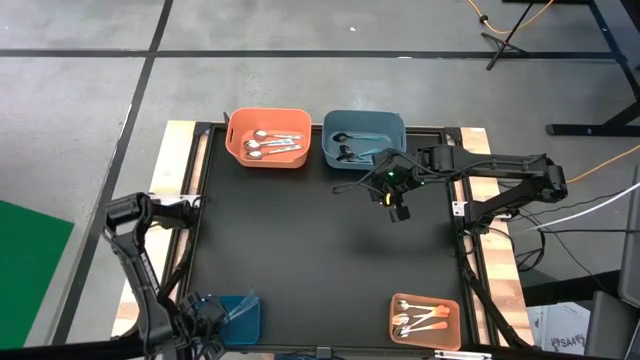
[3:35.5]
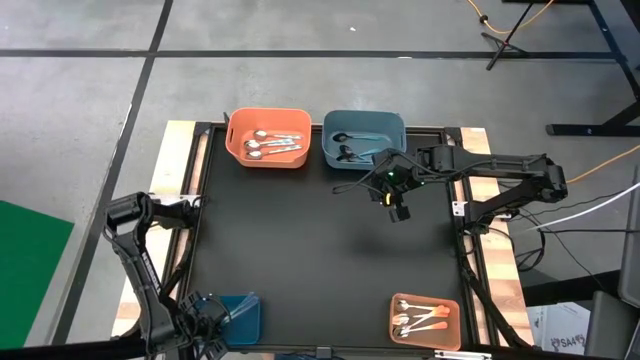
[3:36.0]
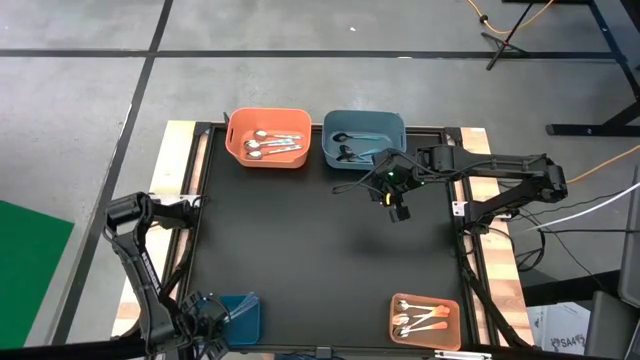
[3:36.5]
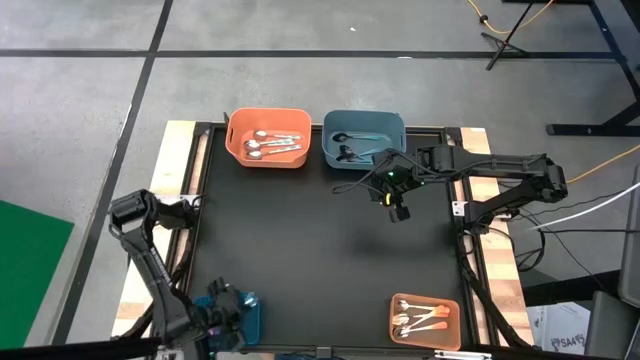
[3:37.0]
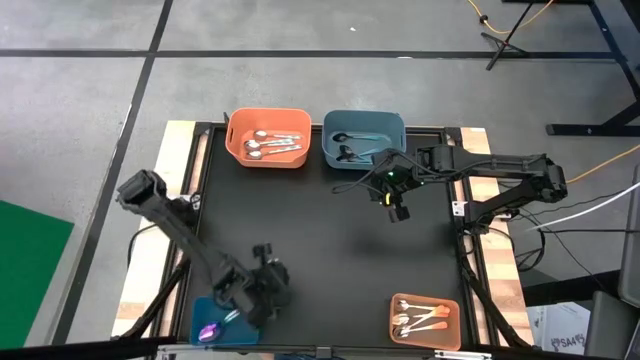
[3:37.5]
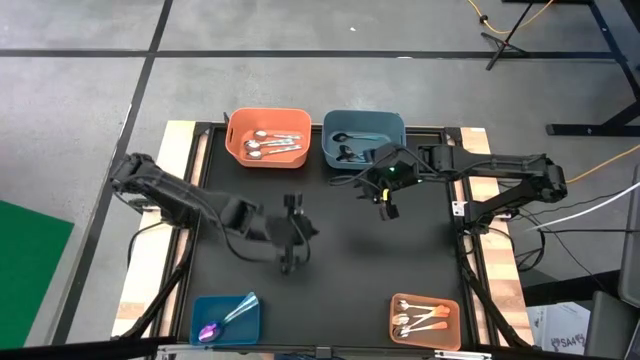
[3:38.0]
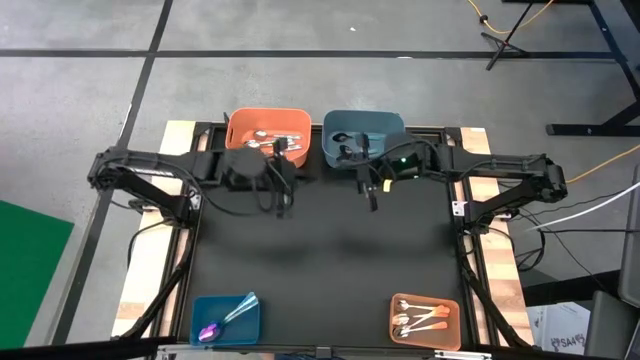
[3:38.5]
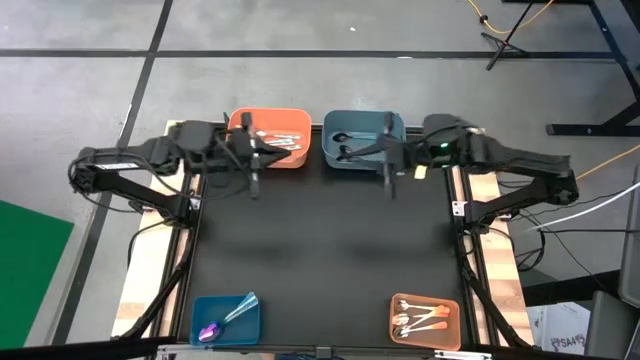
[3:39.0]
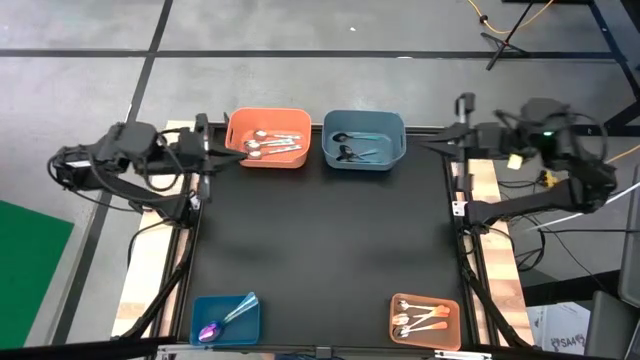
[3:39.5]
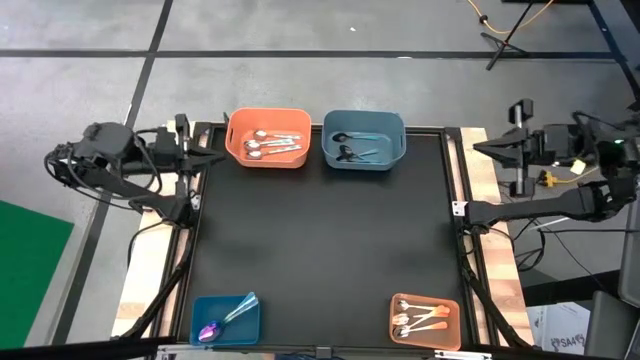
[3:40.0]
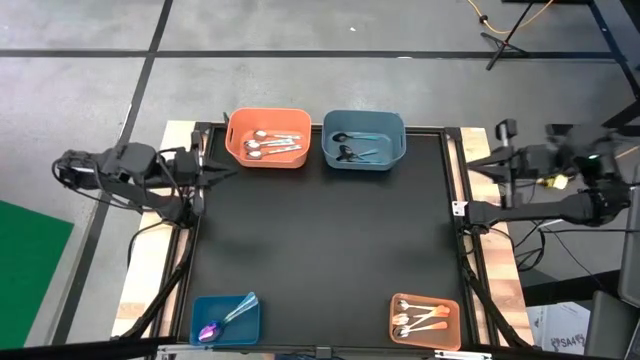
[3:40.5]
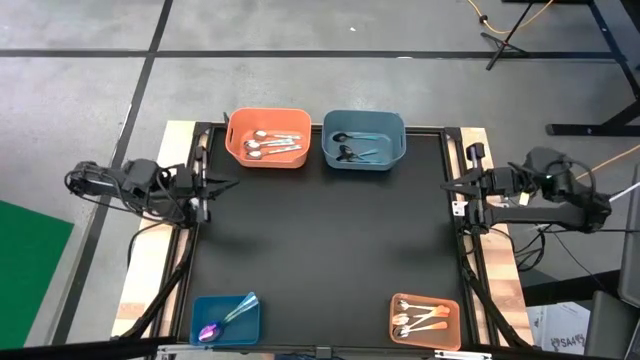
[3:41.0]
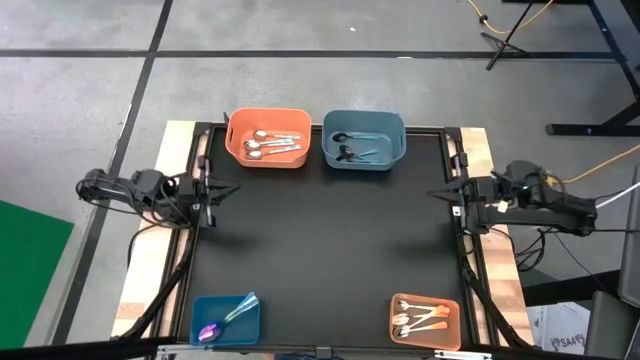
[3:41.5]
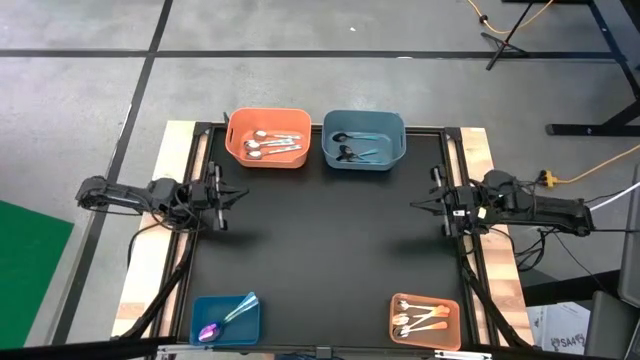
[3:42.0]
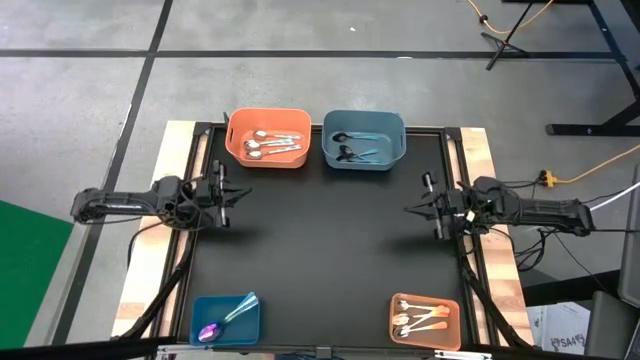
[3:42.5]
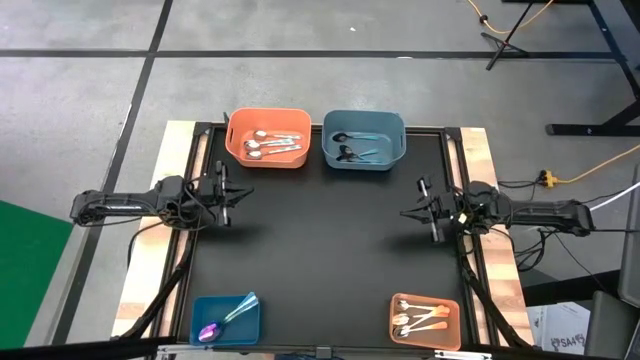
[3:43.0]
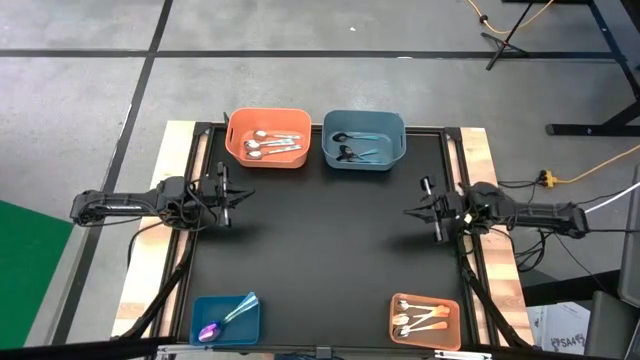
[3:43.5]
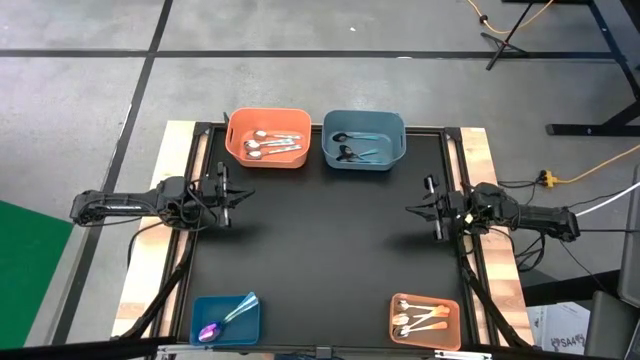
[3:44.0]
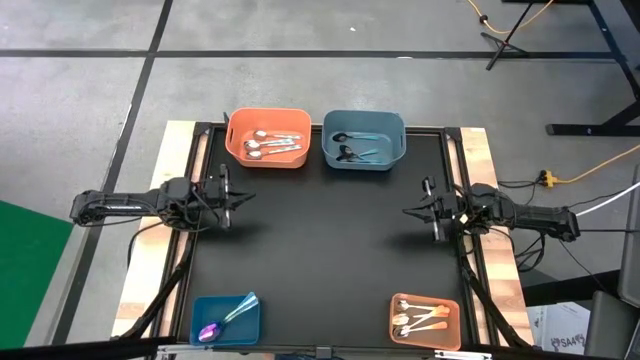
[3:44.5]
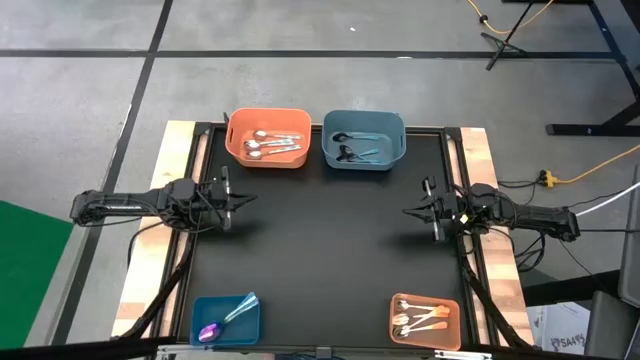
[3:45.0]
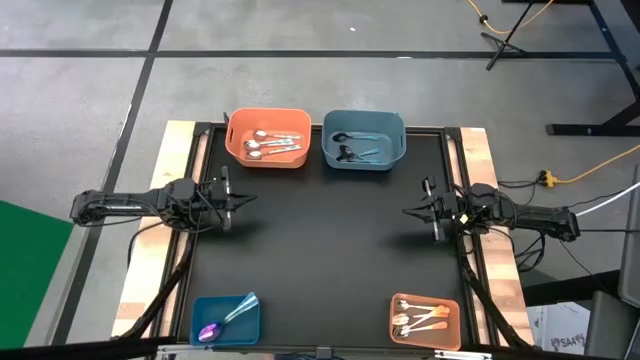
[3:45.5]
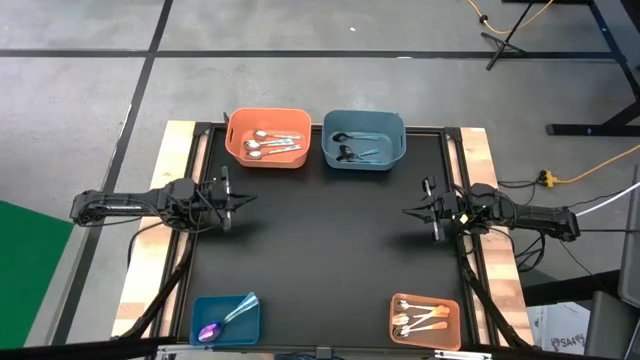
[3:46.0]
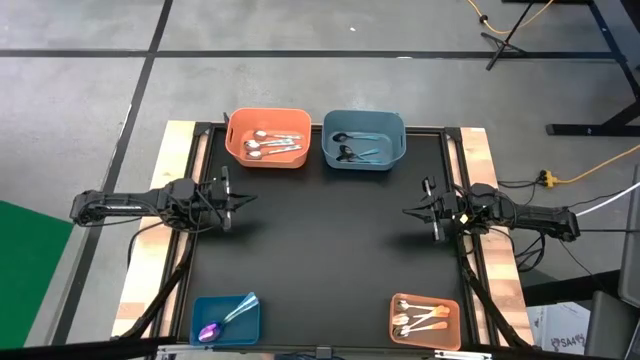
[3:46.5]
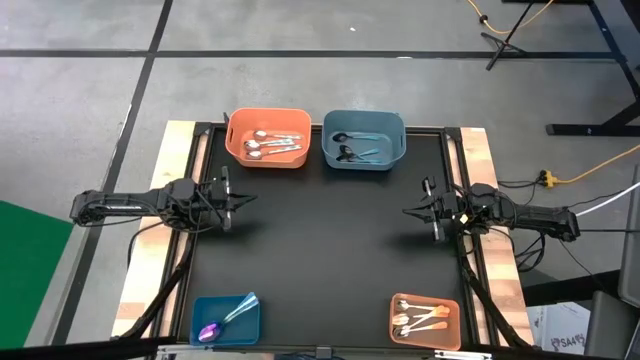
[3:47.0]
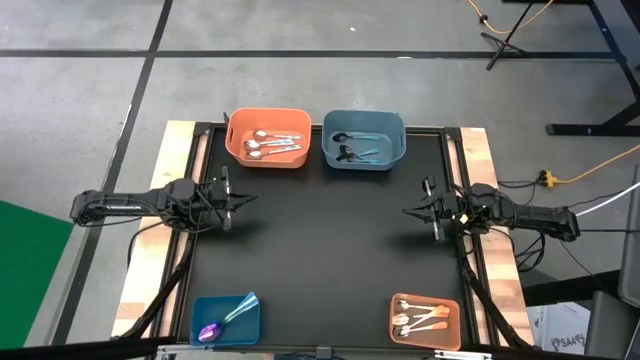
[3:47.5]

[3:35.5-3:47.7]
Task: Sort silverware by color (type)
Return to Home Position

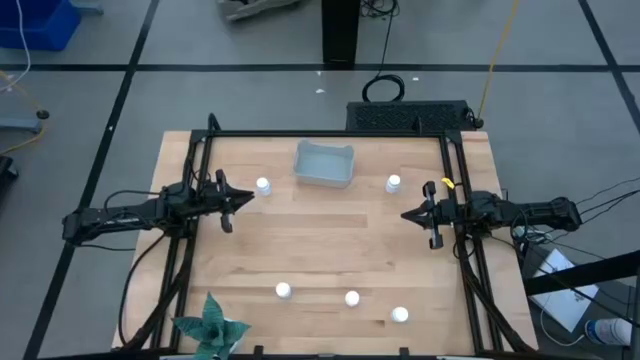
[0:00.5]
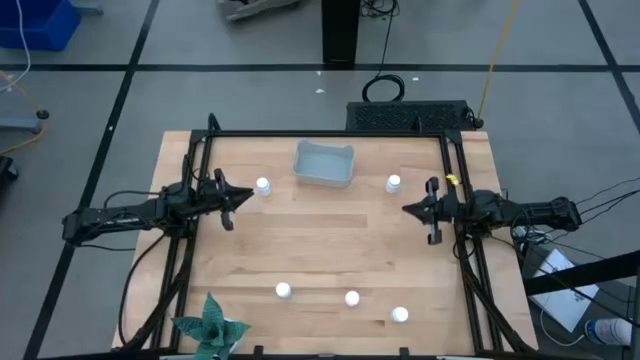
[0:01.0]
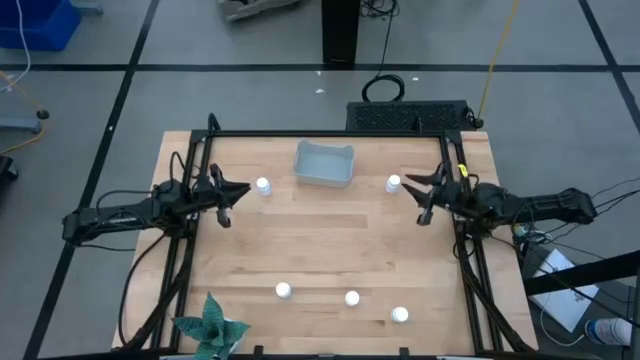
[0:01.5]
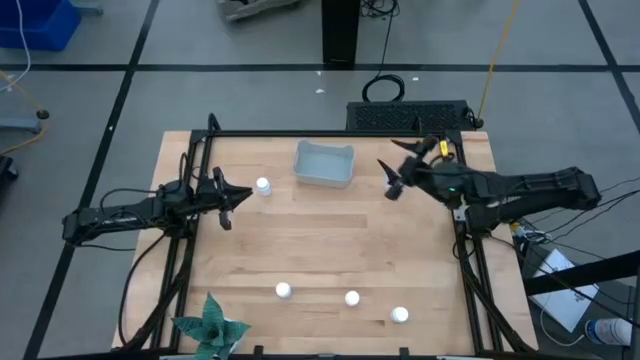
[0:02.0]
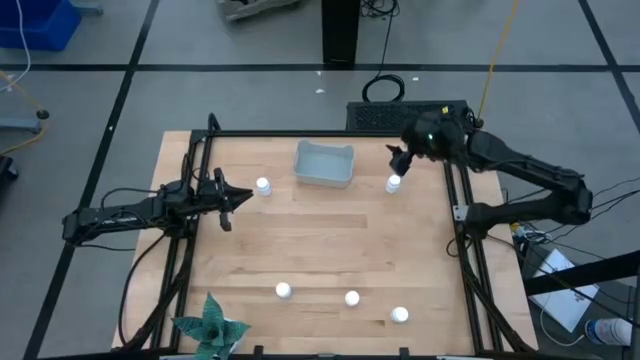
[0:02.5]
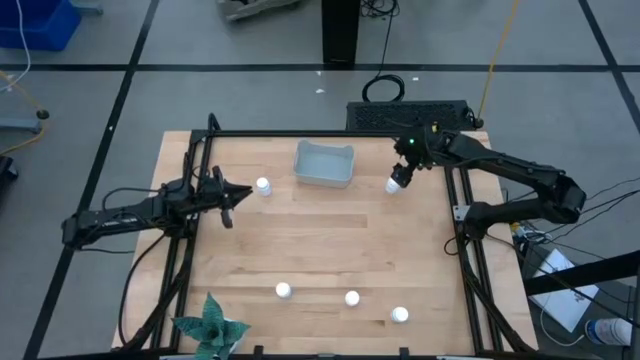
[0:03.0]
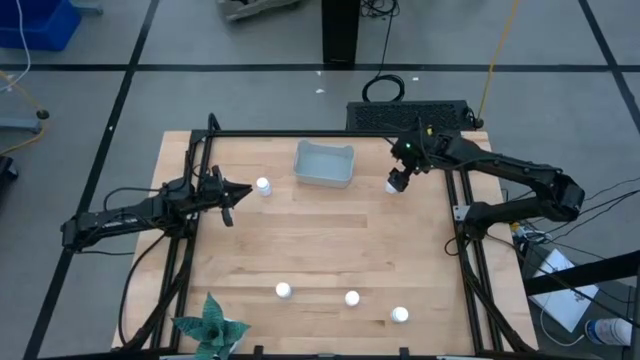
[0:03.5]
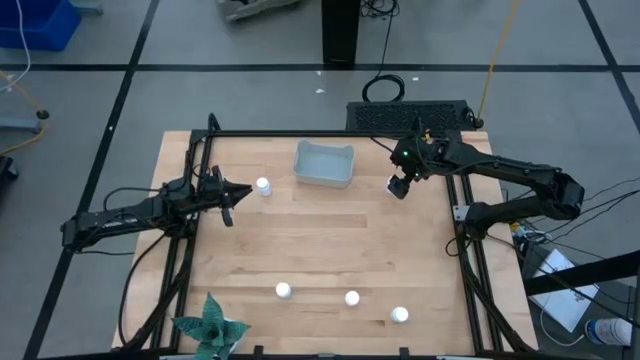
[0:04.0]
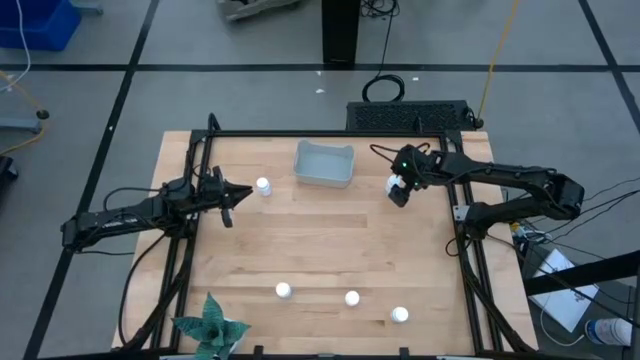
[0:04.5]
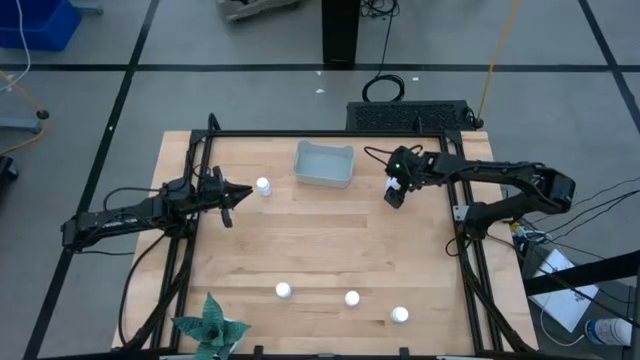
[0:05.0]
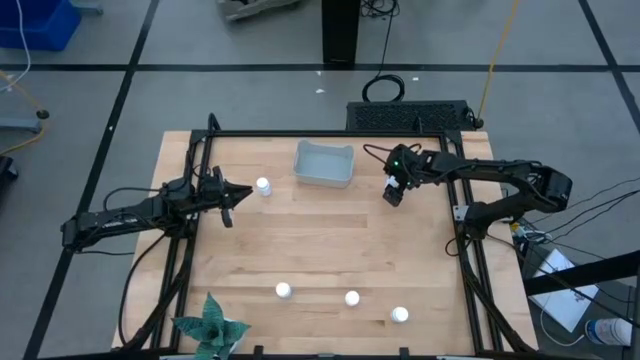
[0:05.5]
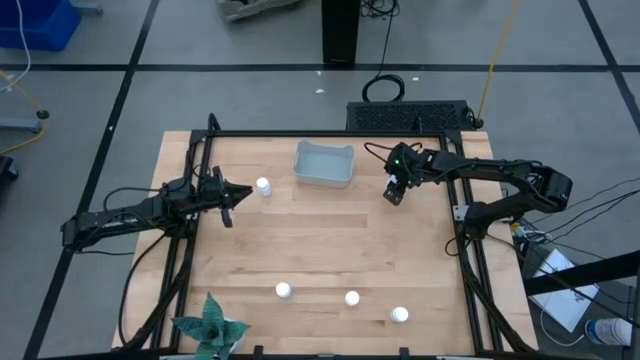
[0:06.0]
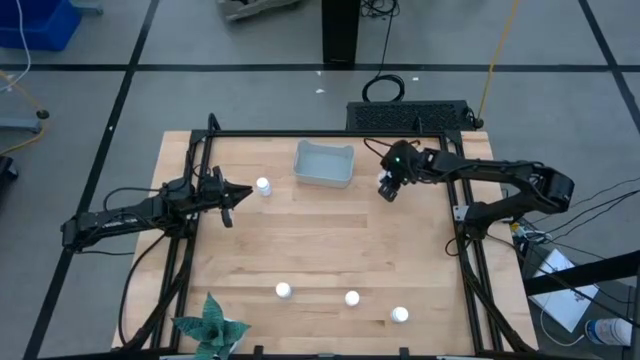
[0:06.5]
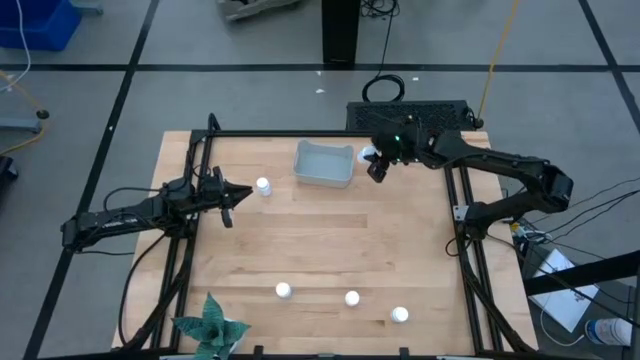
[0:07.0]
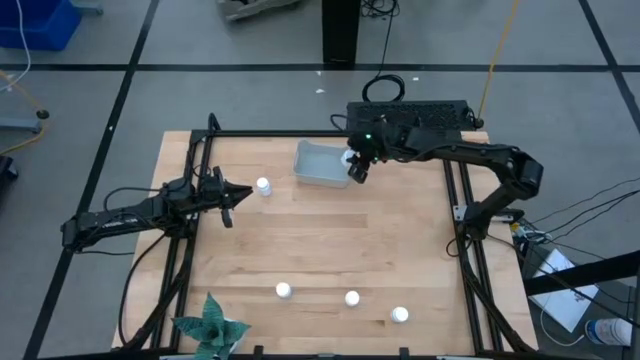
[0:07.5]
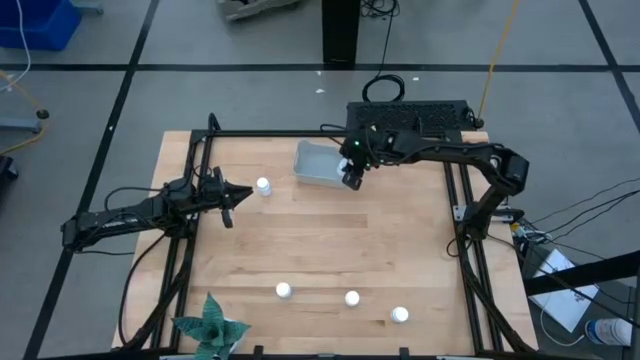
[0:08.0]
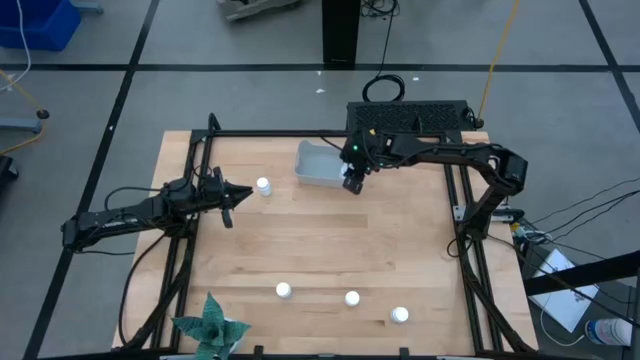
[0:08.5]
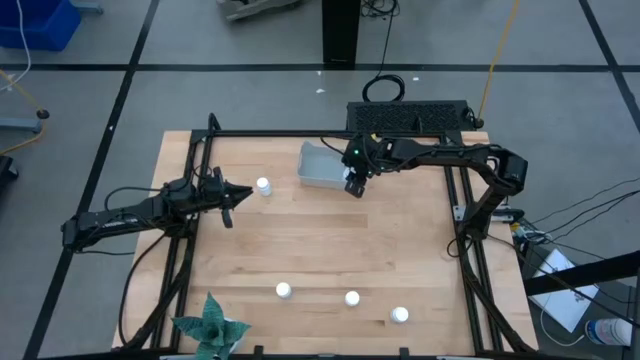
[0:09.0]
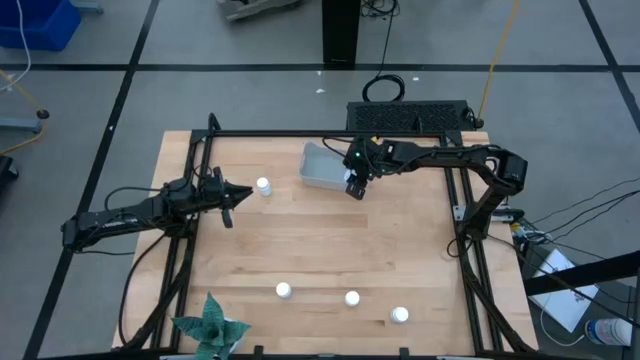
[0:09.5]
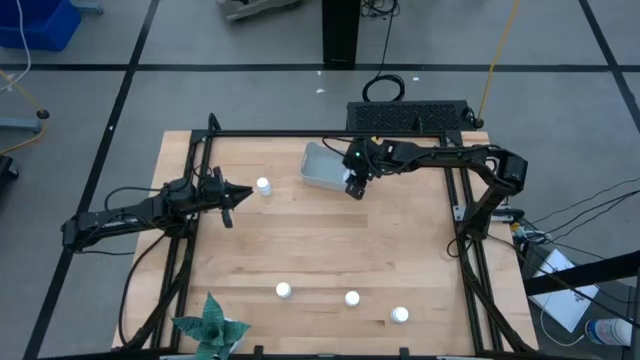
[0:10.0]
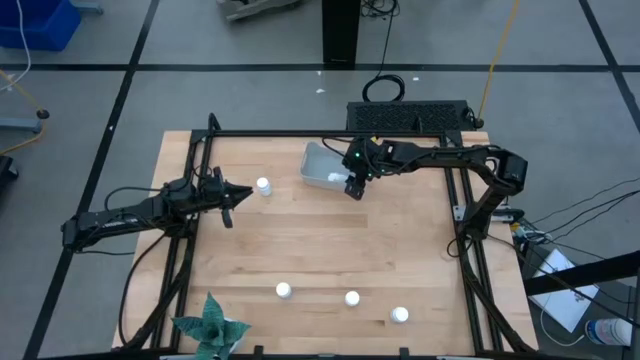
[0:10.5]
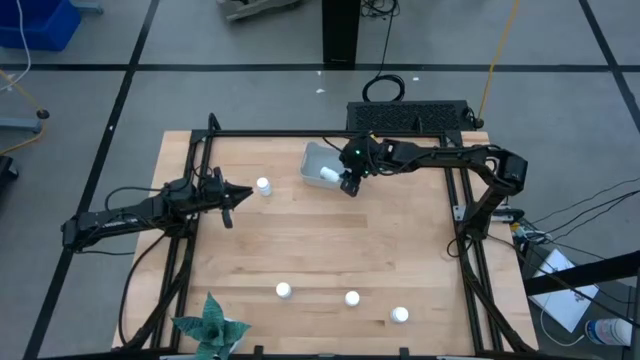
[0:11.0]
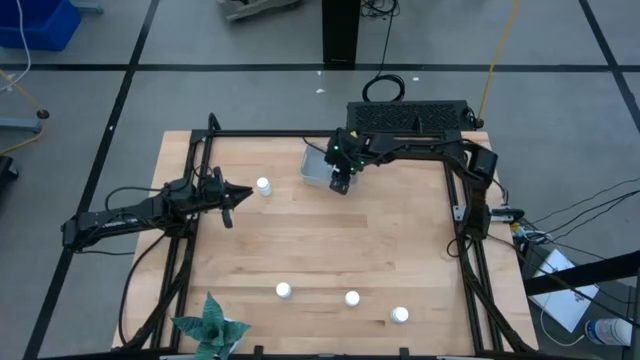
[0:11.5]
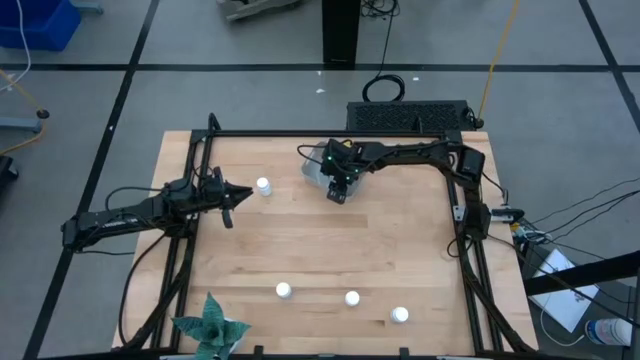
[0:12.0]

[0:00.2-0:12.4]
Task: Pick and place pill bottles into a basket
Put the white pill bottle into the gray bin
